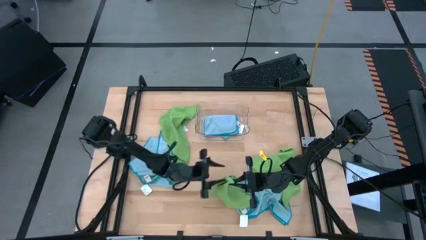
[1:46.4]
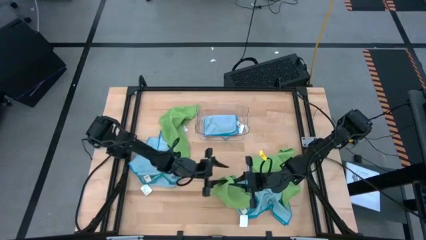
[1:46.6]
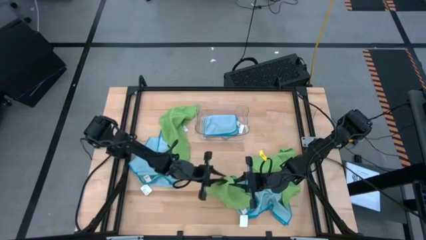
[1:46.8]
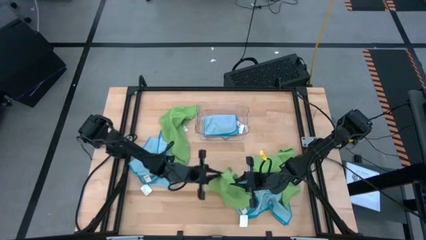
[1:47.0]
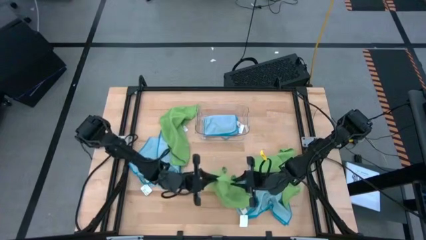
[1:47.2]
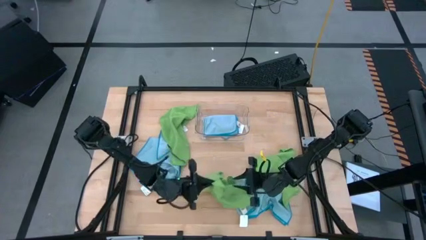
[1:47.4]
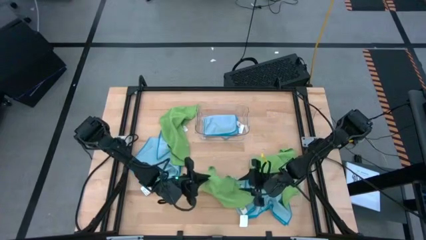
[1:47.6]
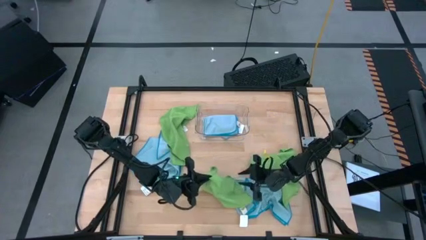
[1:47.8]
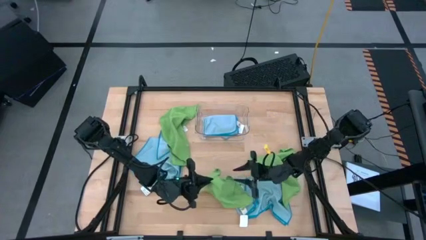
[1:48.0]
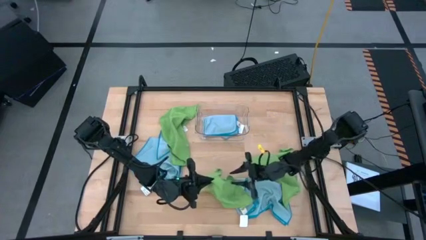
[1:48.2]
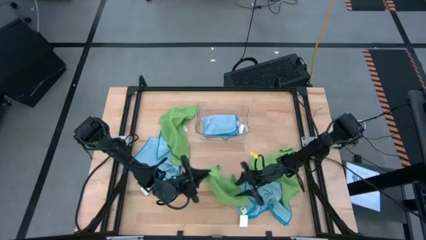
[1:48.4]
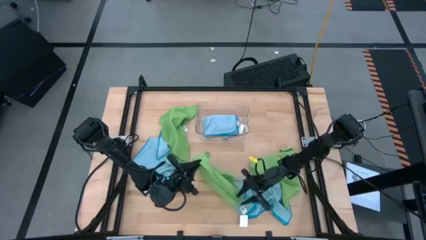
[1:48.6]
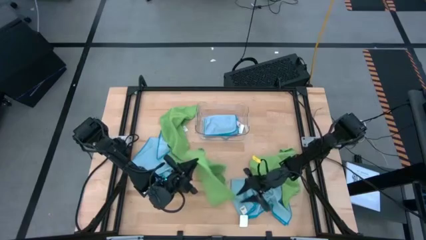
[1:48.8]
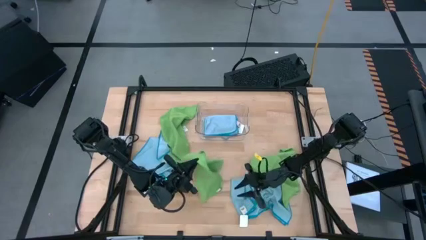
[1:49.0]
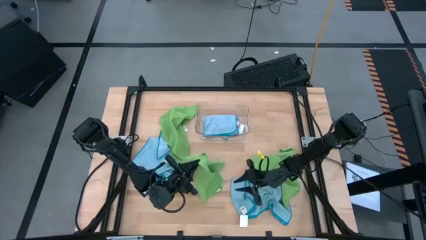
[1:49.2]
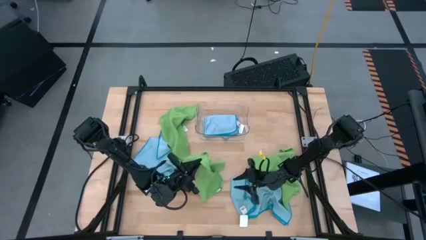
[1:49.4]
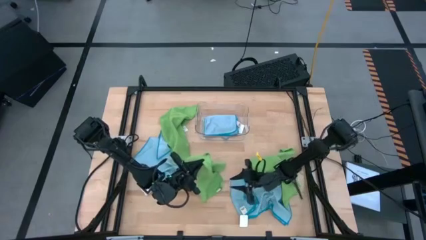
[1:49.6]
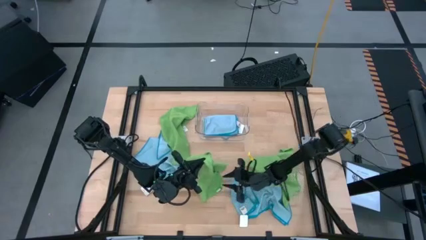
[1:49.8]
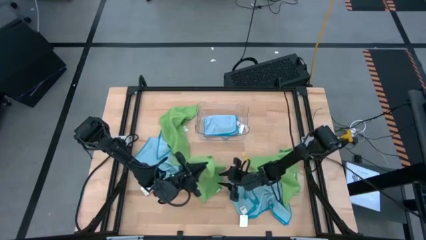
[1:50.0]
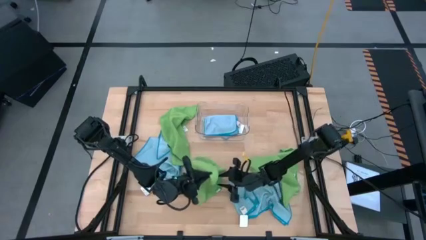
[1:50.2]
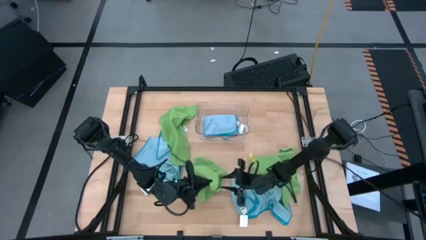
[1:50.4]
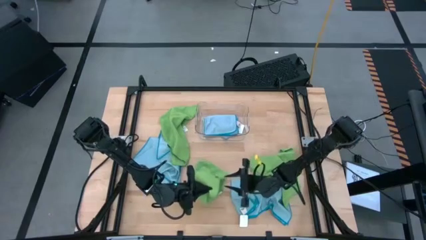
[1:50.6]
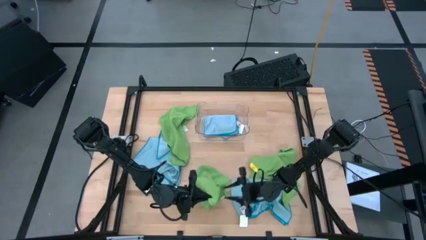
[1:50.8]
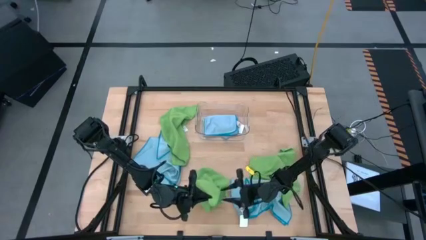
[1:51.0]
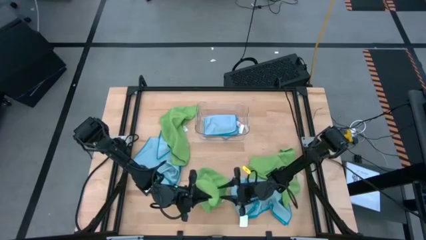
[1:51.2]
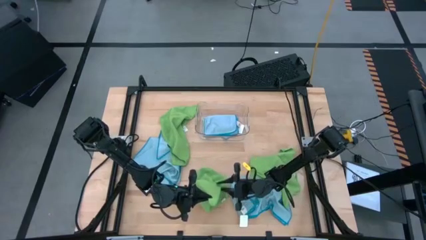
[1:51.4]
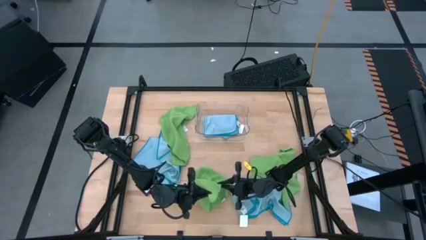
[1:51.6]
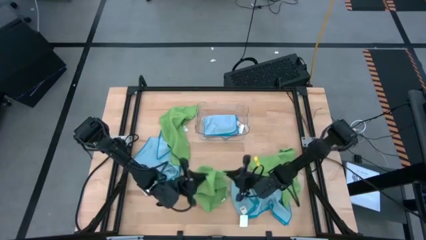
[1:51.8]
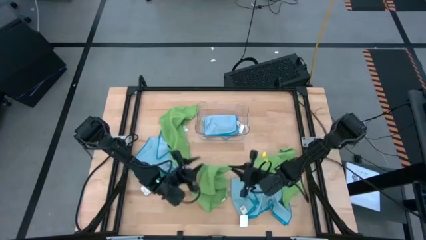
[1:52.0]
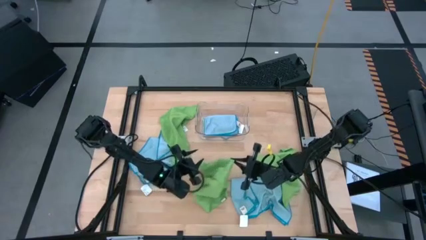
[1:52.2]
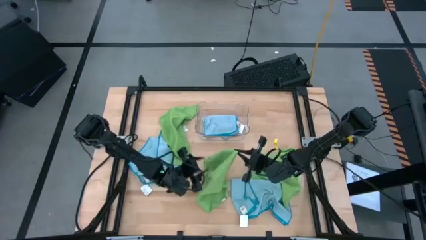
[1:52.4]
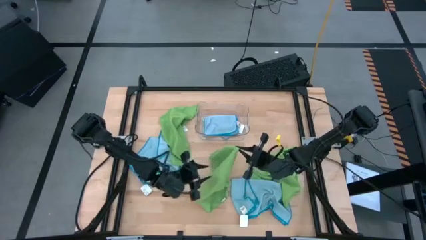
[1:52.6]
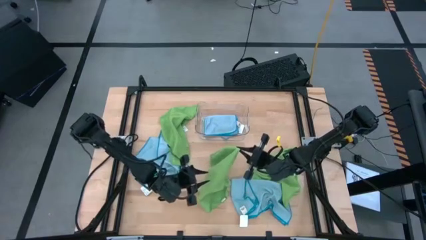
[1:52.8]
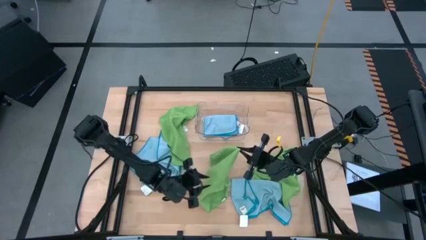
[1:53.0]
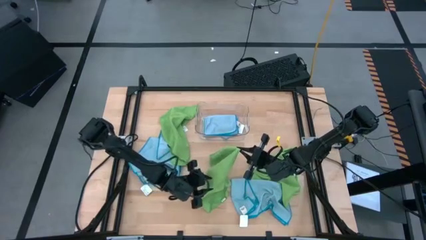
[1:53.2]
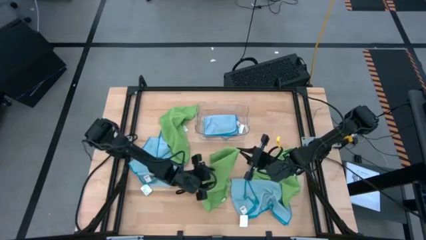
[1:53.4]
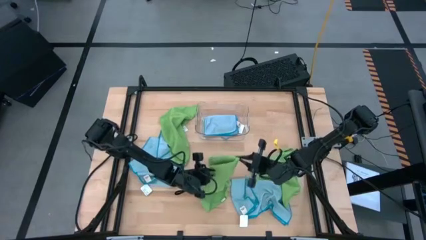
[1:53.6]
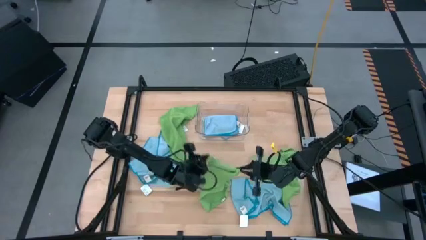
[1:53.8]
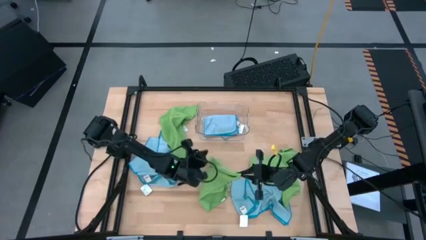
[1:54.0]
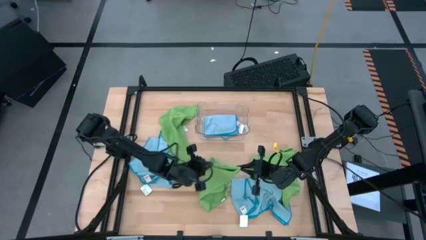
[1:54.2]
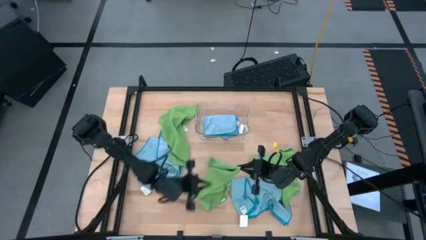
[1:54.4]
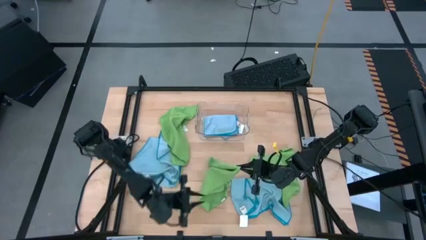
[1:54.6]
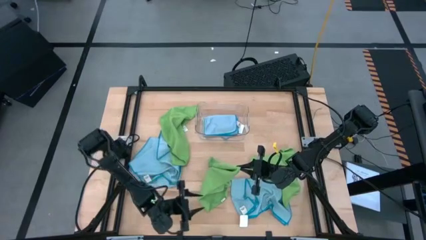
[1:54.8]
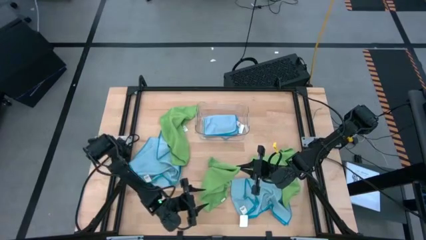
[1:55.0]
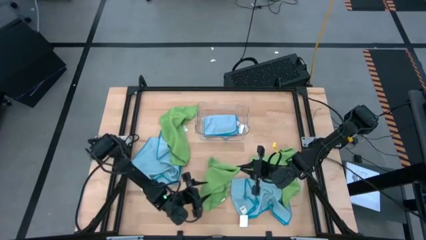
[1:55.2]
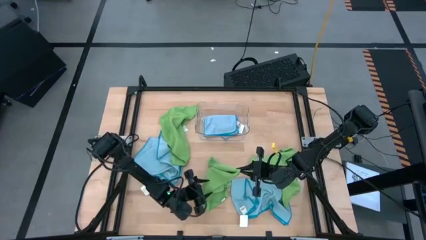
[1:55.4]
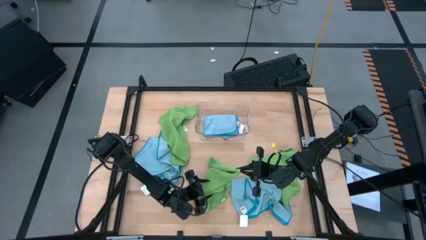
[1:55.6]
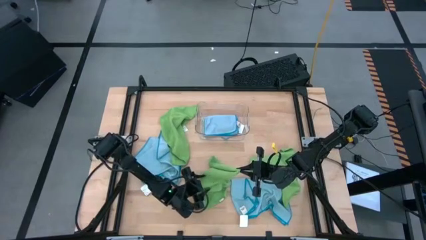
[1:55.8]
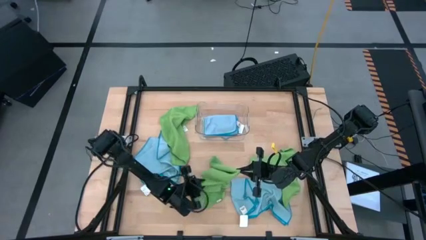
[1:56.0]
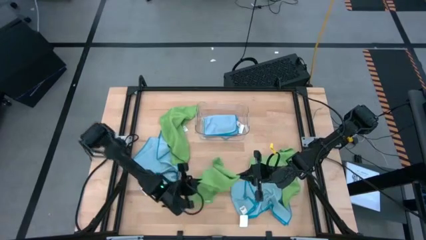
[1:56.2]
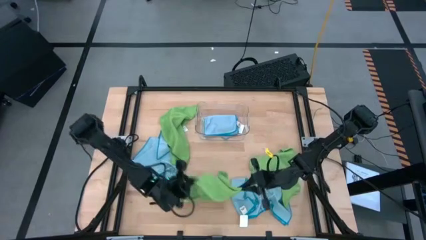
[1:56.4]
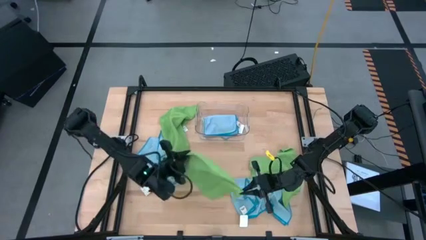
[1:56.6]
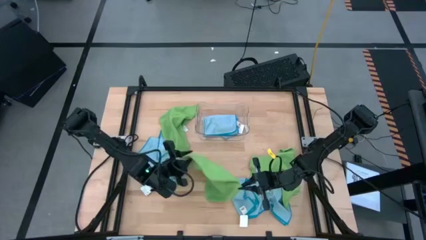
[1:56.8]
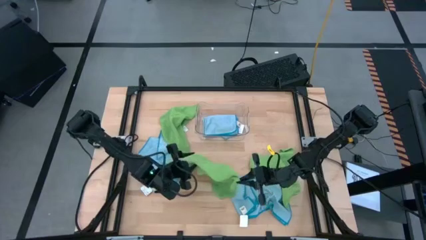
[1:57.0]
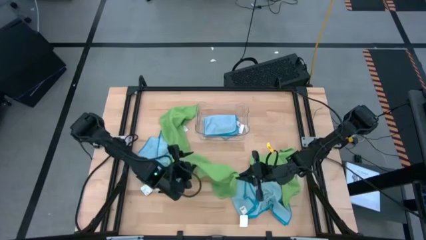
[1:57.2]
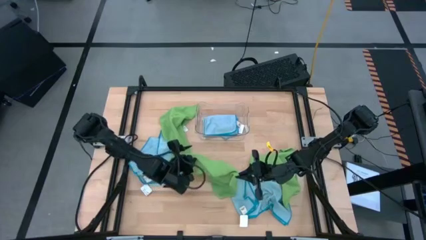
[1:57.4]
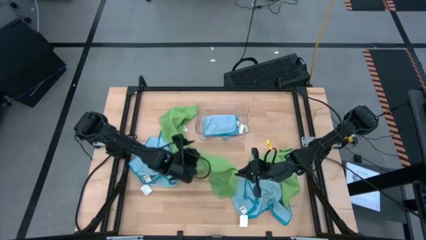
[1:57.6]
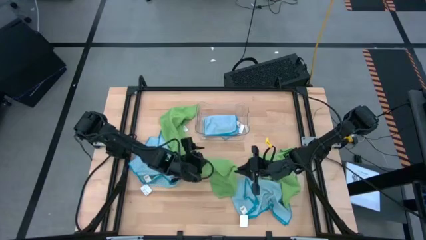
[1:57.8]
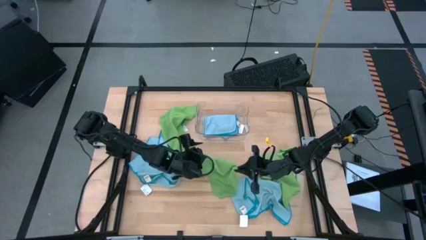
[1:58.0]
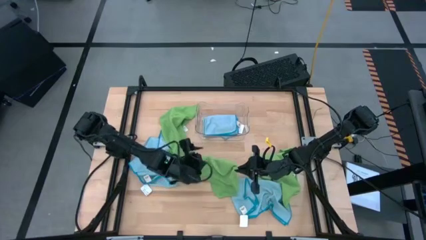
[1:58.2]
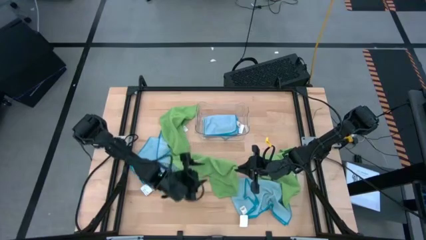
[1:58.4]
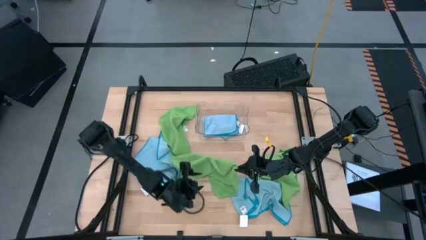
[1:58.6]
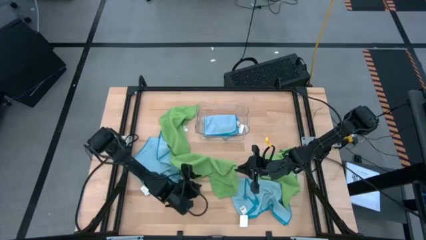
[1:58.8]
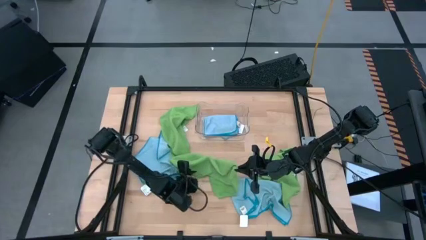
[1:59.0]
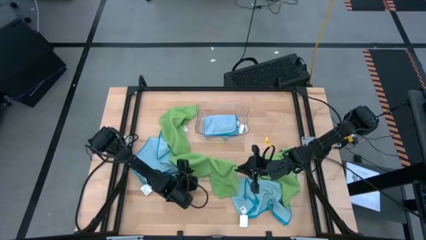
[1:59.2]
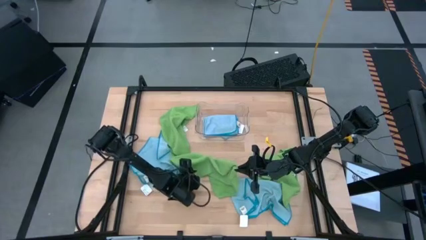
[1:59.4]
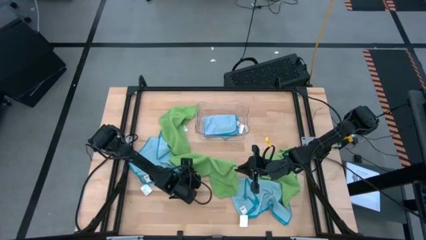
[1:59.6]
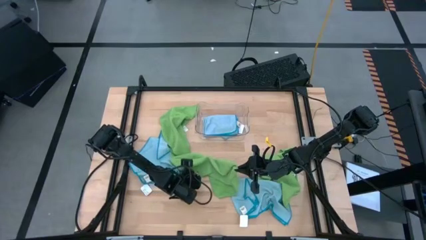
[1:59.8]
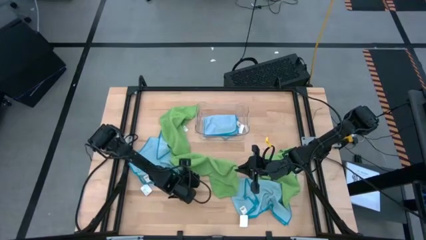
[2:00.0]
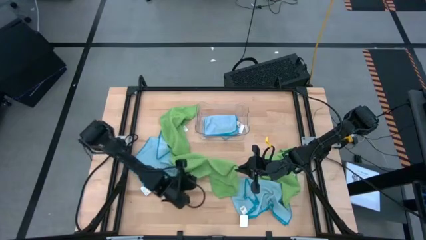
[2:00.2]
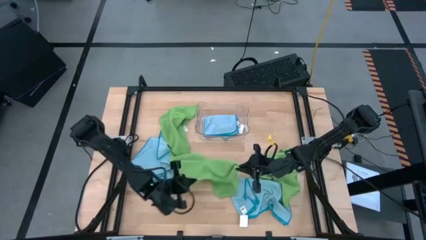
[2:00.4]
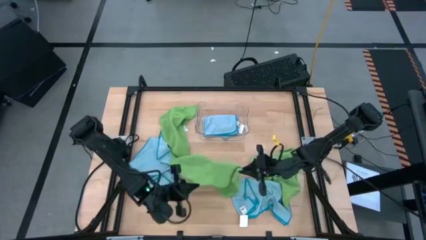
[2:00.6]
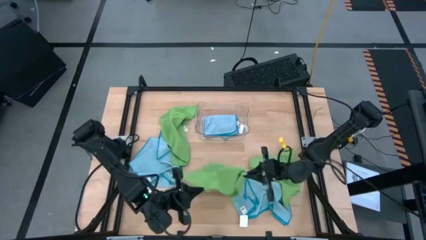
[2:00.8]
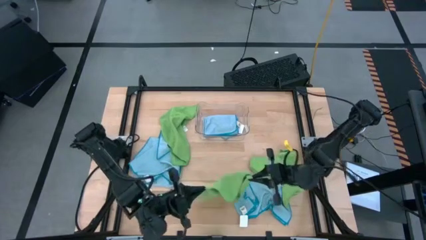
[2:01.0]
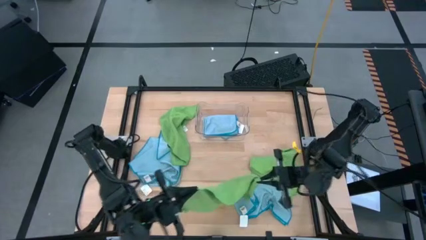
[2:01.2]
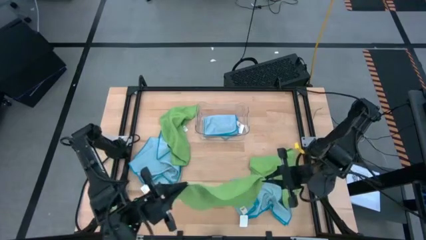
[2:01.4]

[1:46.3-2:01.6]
Task: Fold microfiber towels
Fold the bottom left green microfiber cloth
